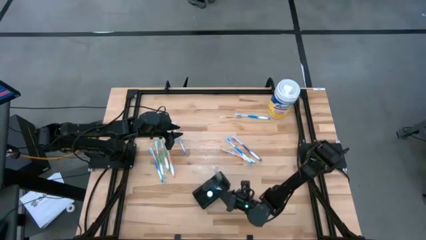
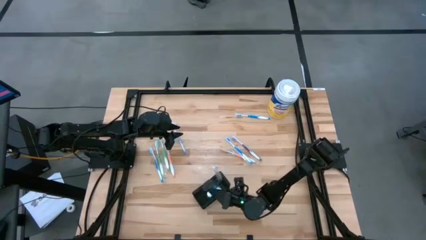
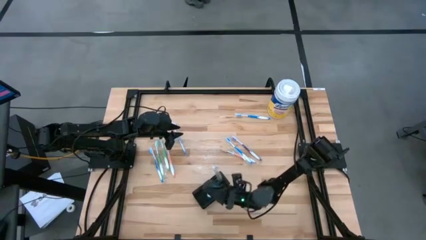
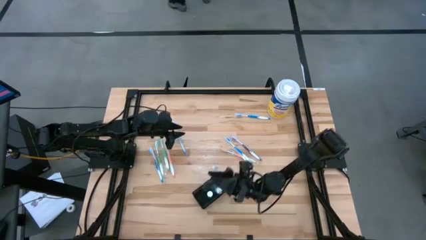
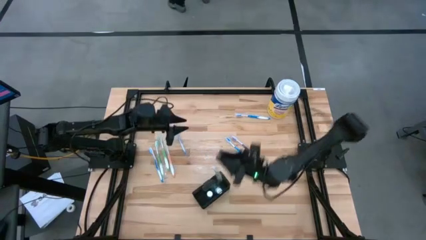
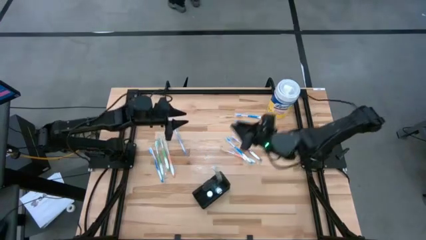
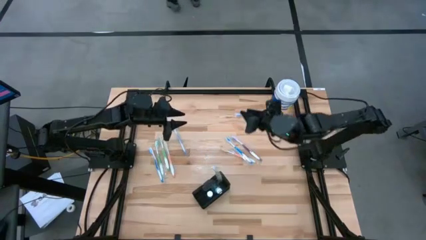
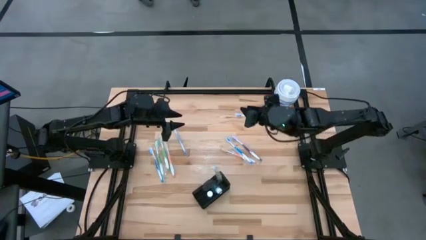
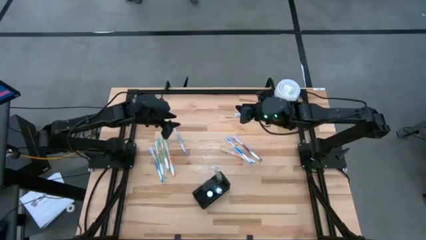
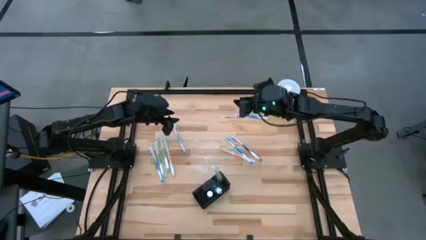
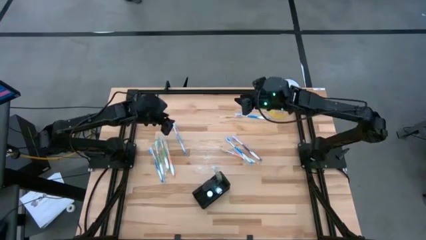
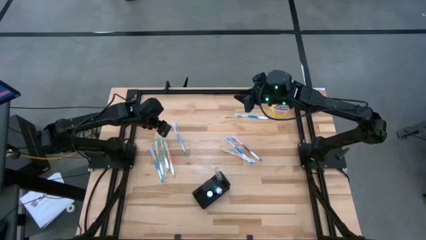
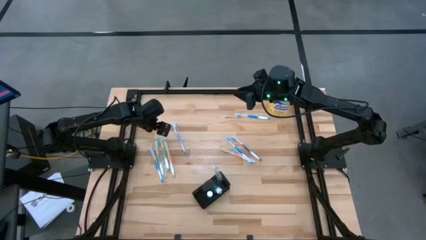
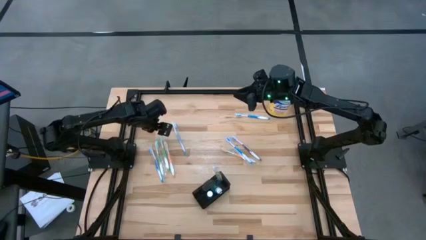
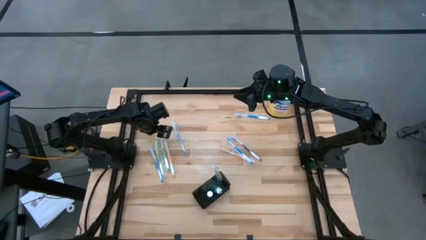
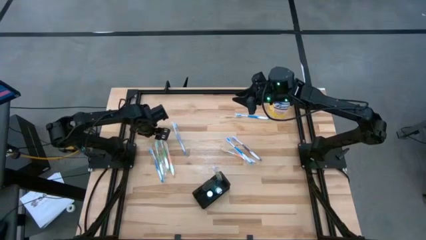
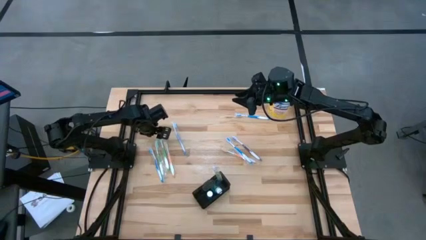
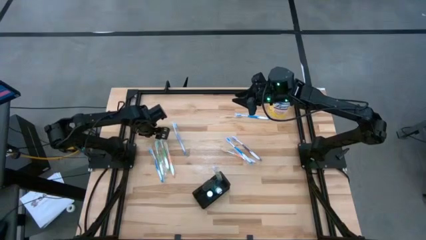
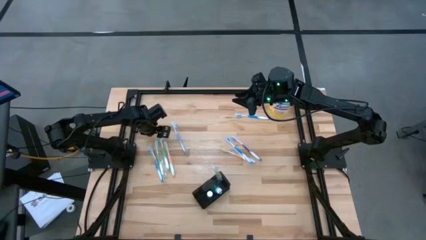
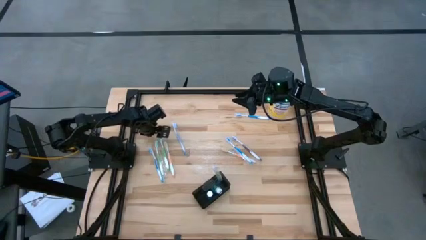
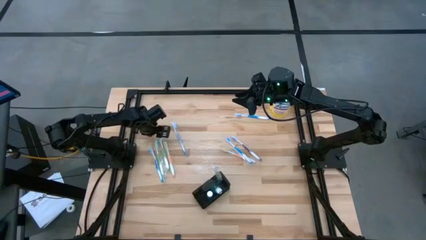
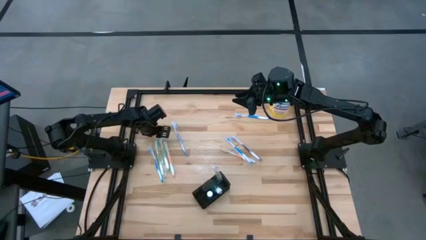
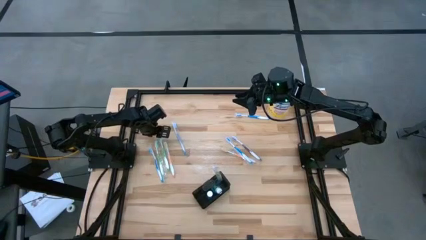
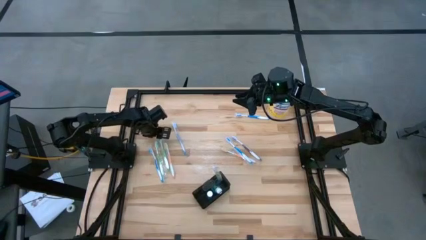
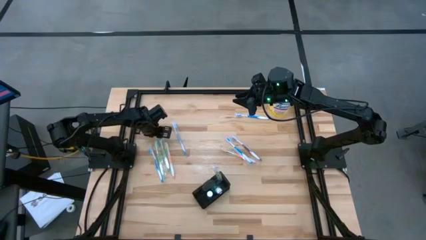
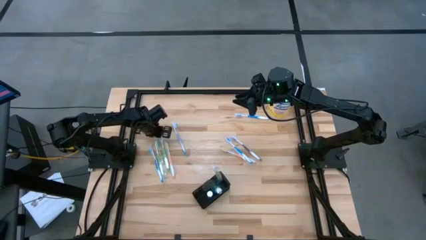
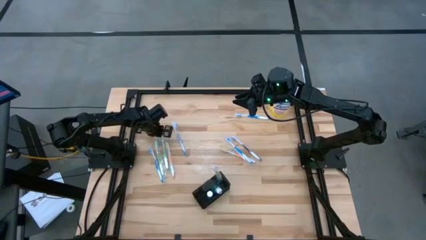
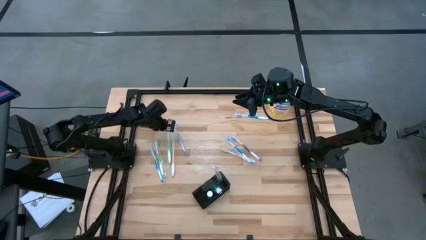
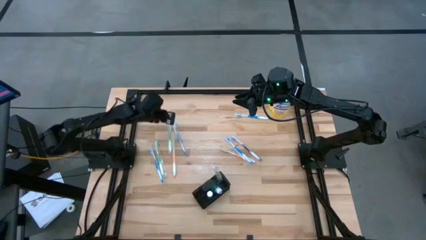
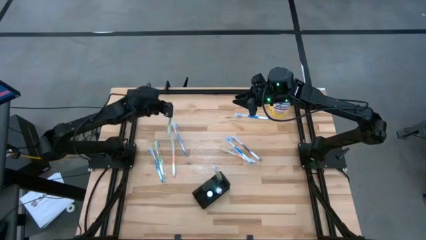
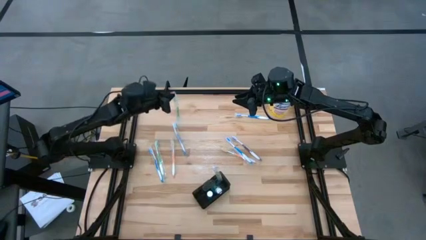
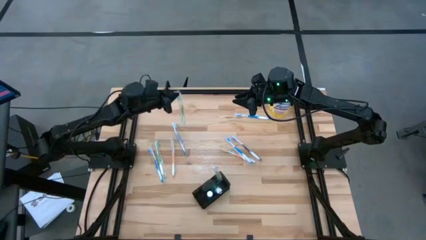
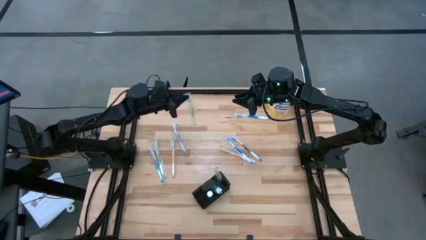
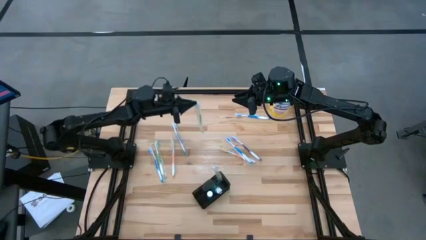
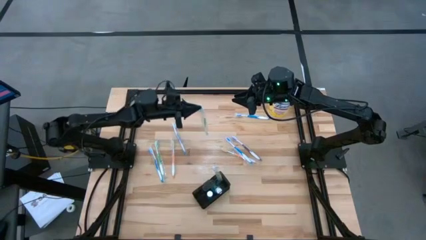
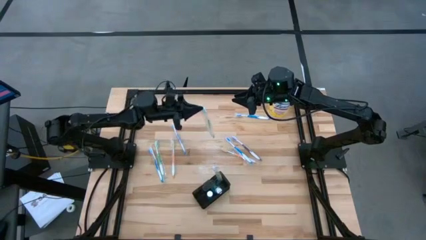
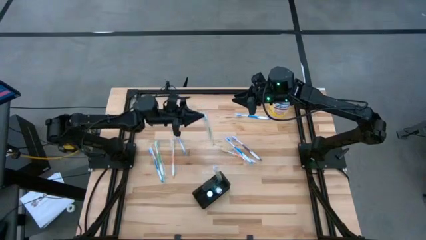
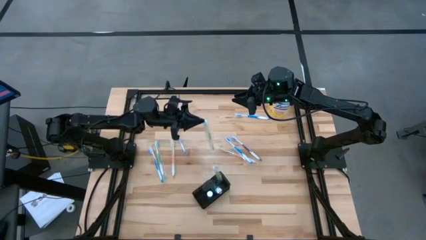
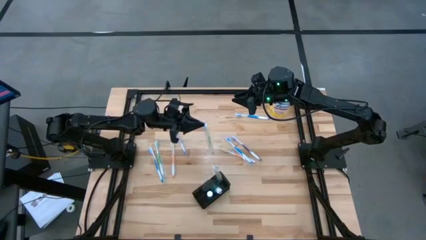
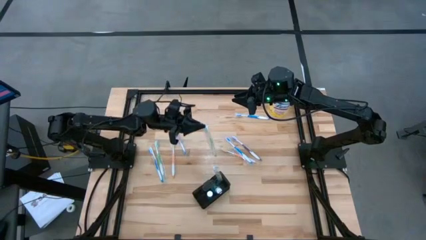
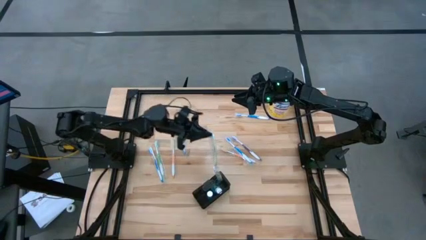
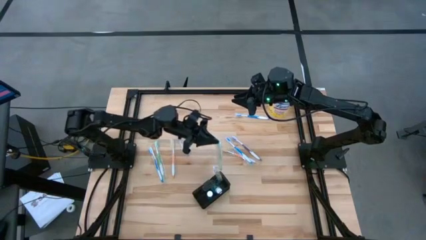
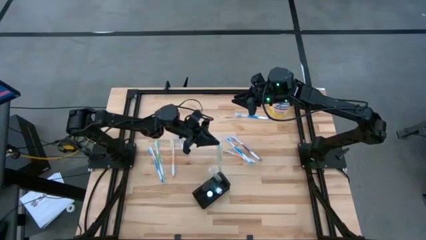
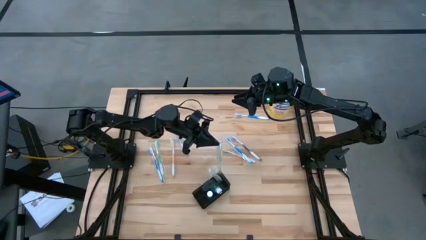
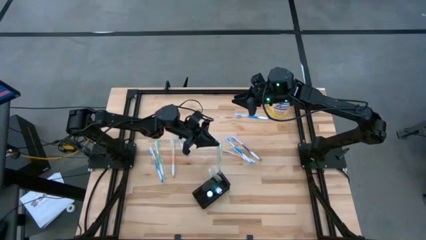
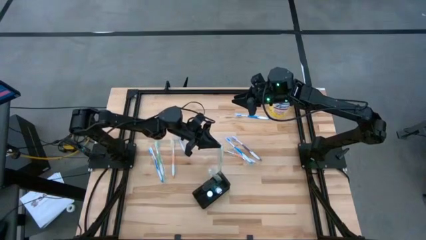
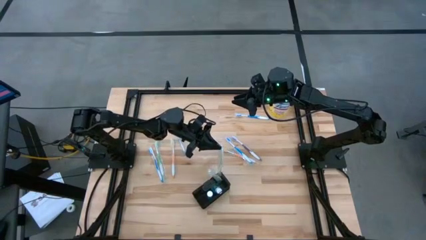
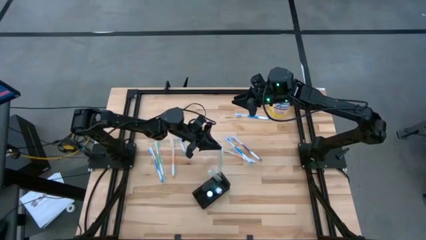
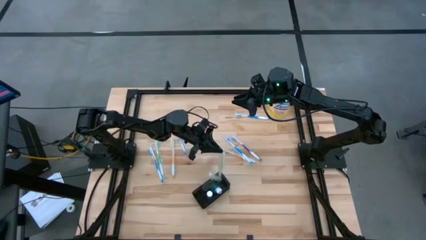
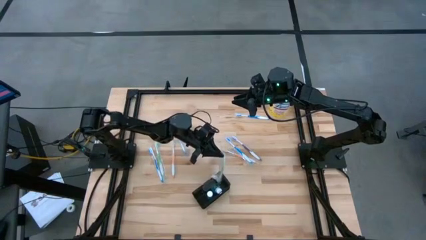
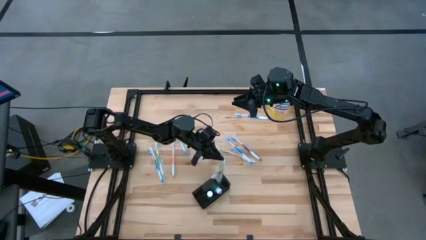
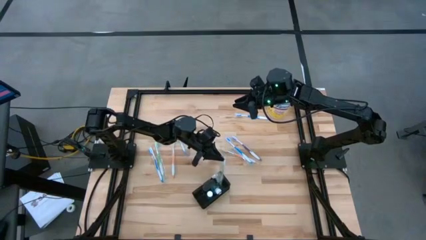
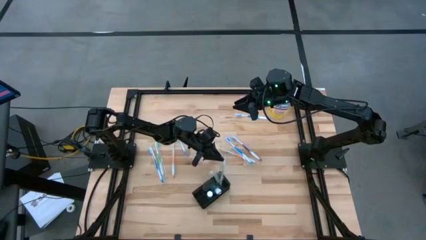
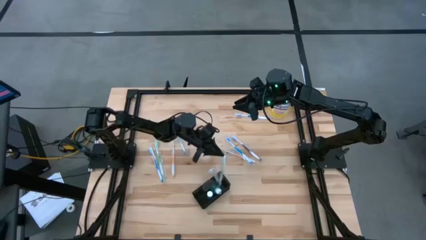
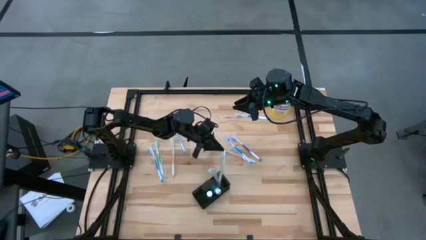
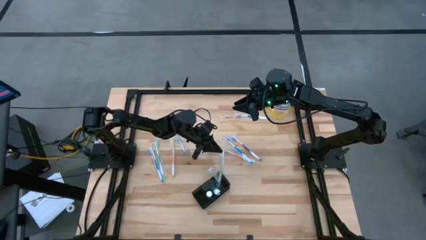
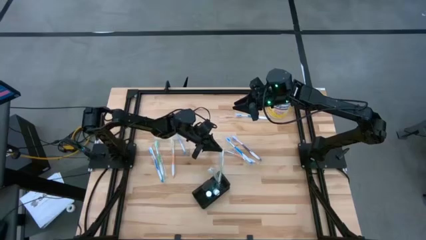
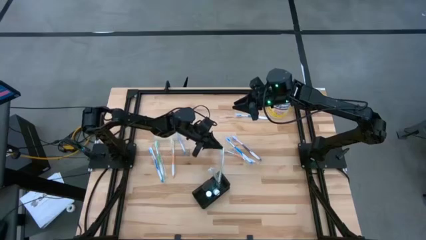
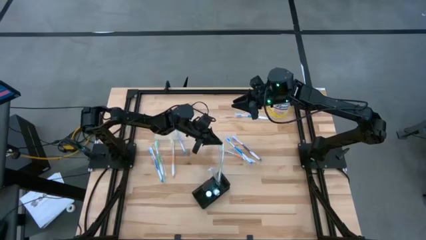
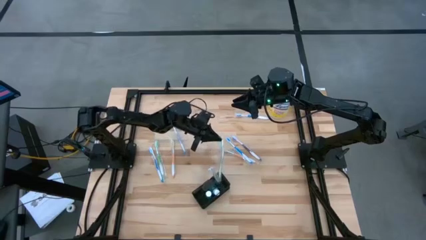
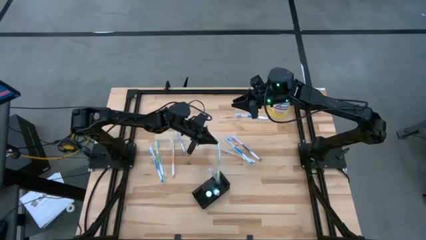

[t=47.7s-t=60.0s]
Task: Pick & Place toothbrushing station
Put the green toothbrush into the mesh organizer

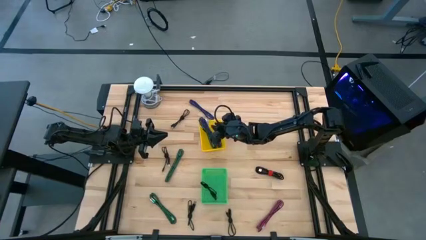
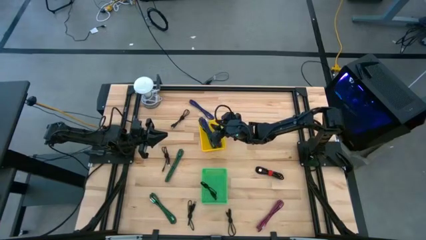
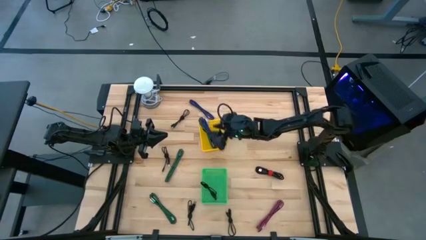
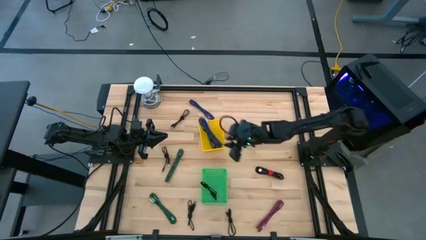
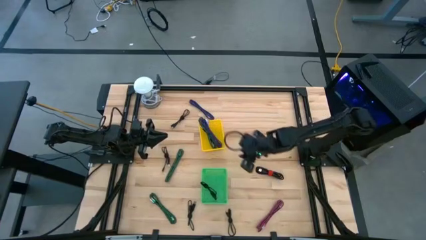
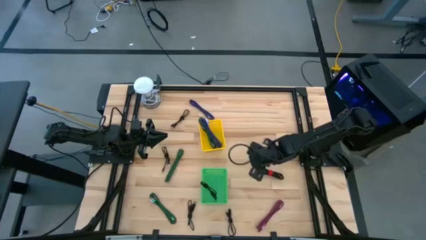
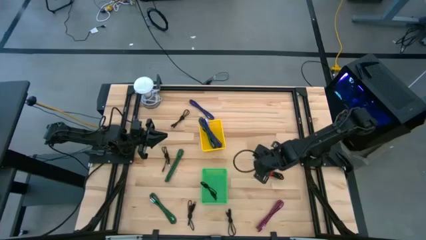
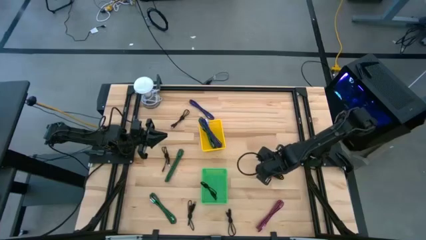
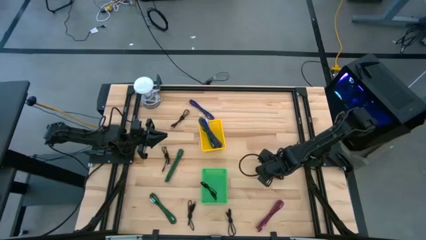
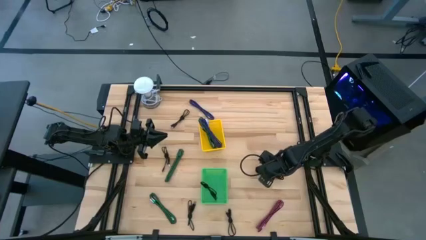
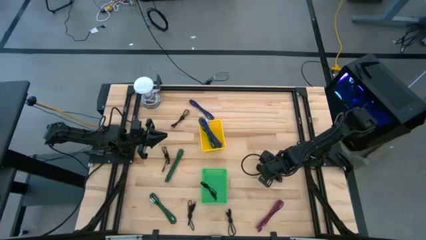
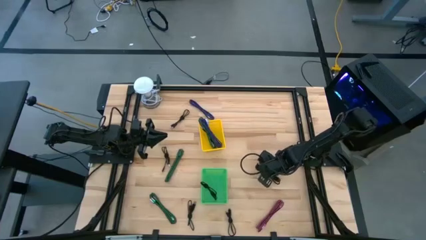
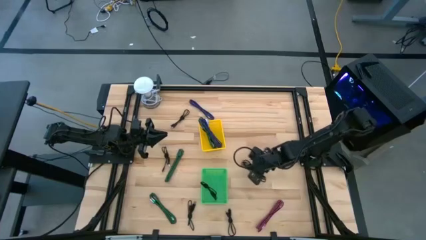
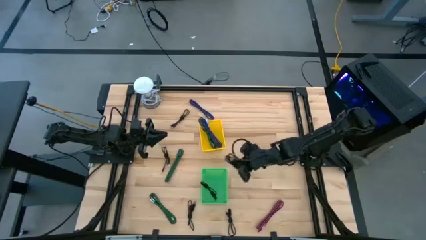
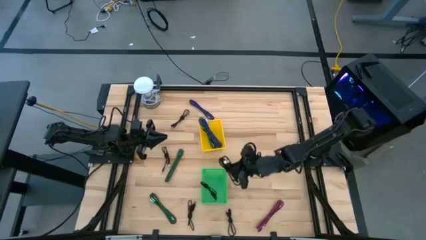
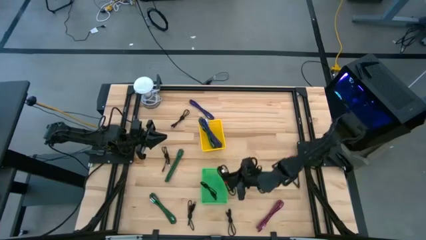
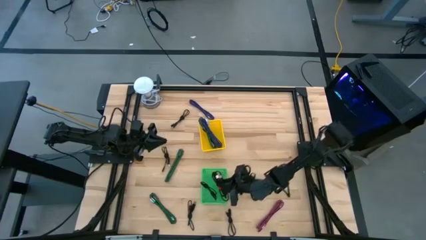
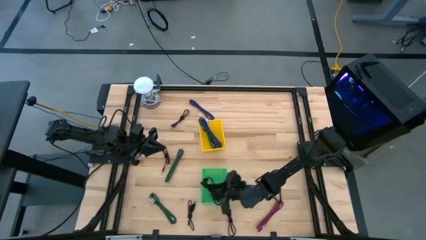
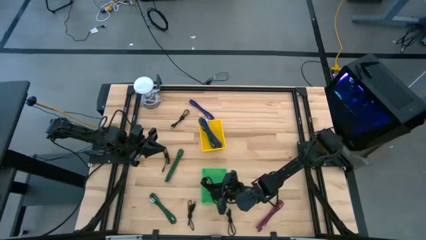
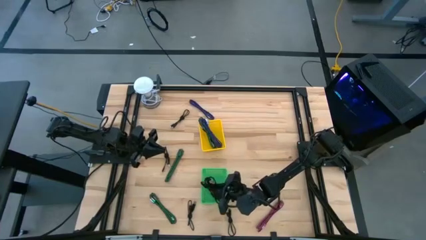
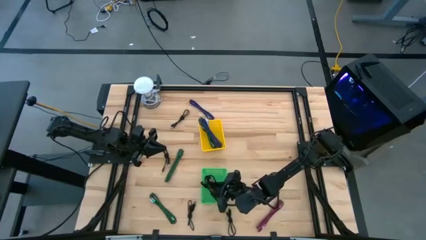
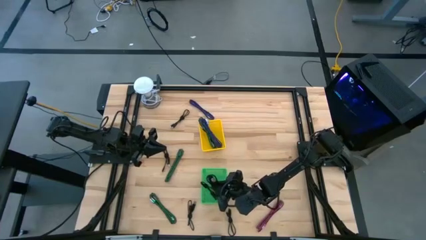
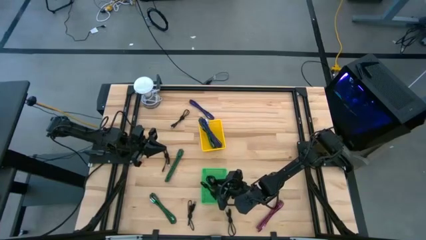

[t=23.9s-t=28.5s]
Task: Pick & Place USB Port
Put the black charger cable into the green bin
